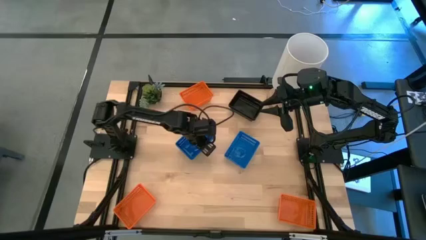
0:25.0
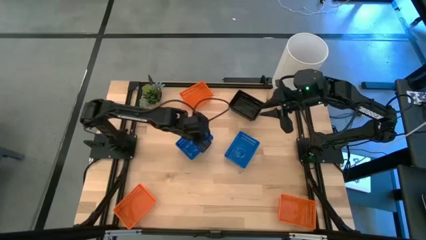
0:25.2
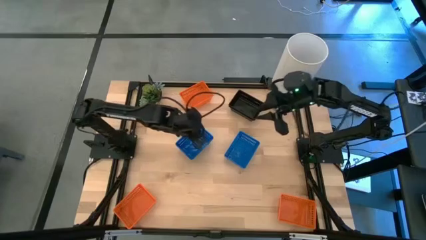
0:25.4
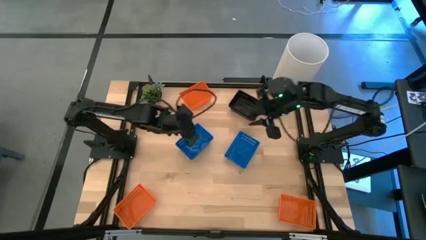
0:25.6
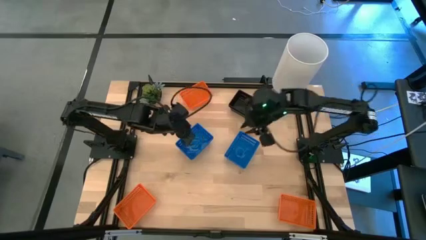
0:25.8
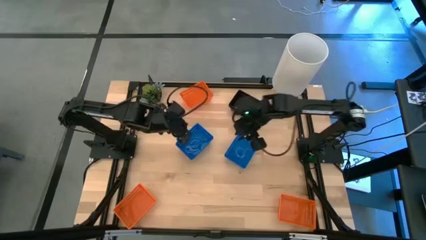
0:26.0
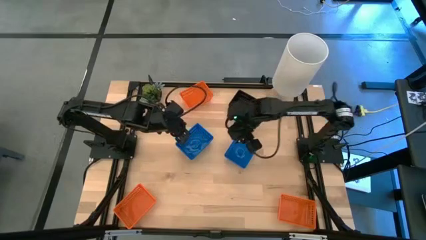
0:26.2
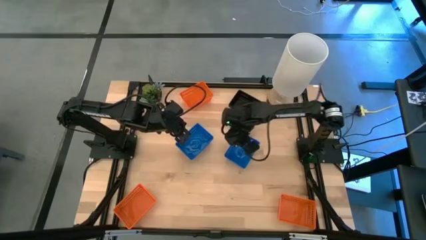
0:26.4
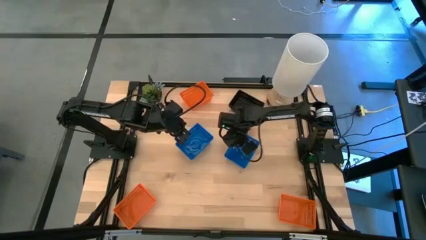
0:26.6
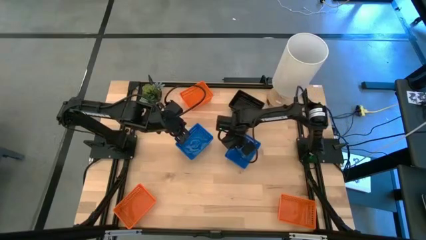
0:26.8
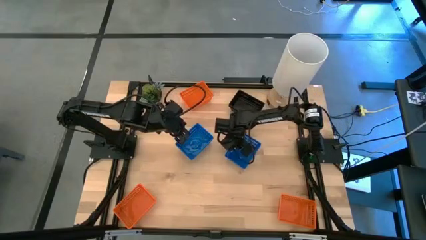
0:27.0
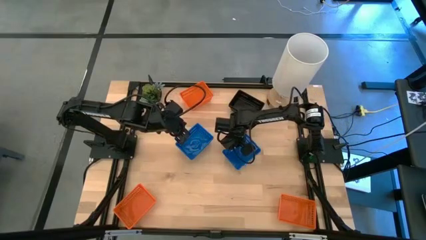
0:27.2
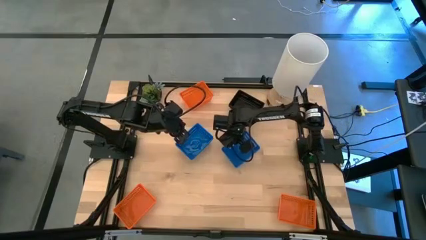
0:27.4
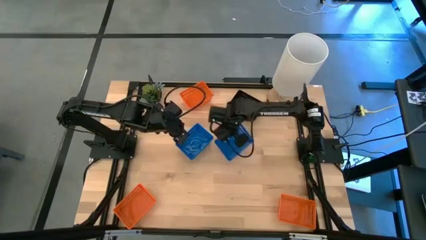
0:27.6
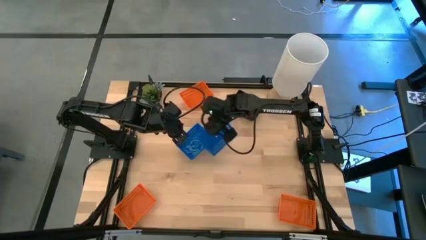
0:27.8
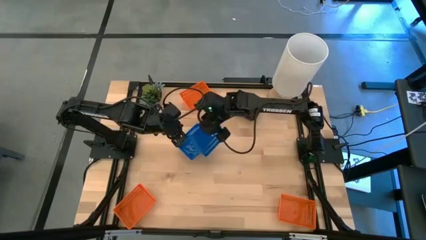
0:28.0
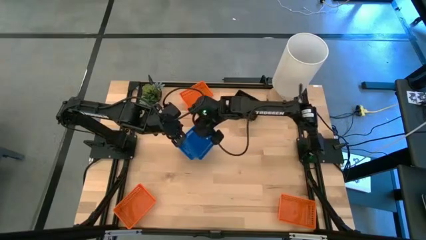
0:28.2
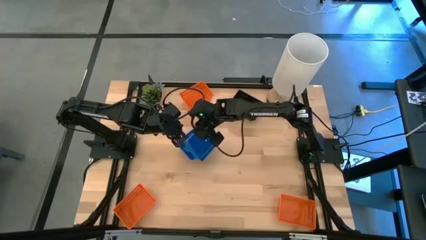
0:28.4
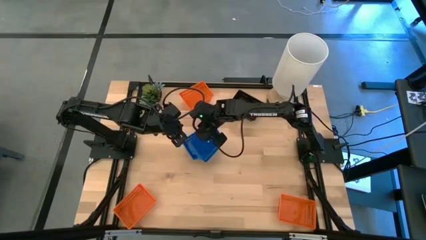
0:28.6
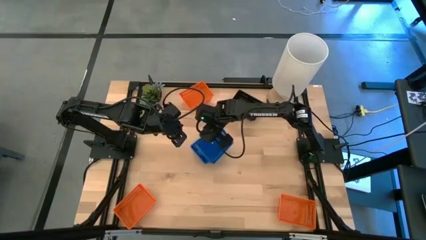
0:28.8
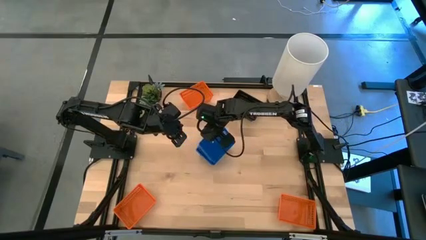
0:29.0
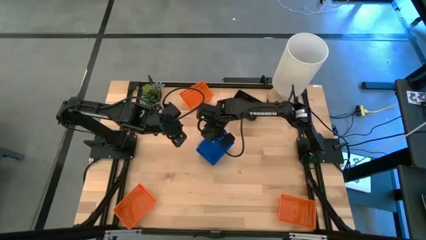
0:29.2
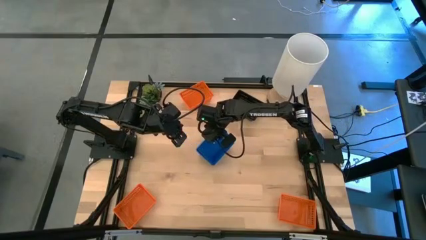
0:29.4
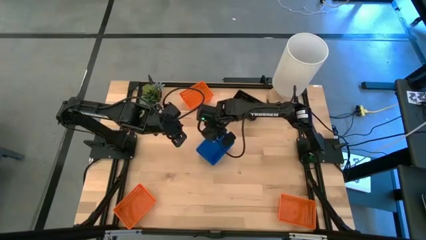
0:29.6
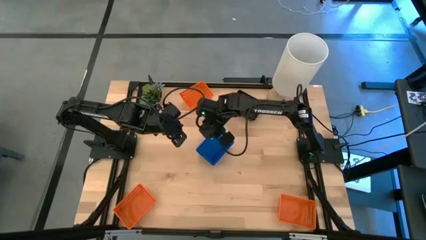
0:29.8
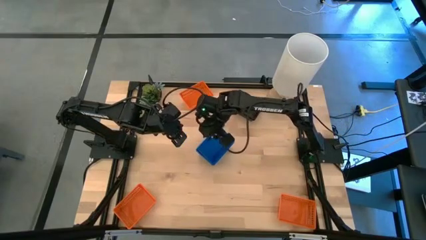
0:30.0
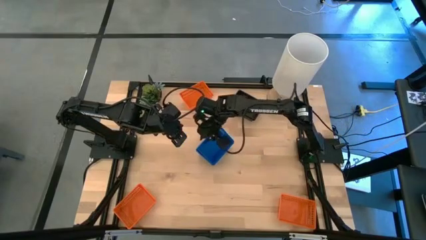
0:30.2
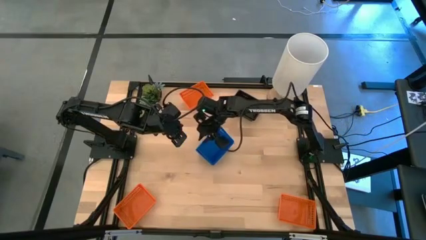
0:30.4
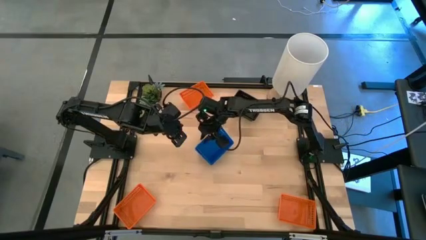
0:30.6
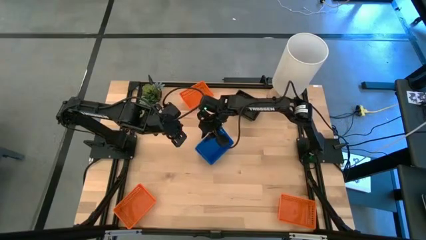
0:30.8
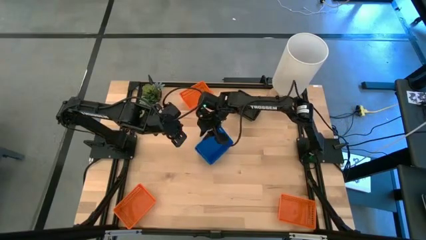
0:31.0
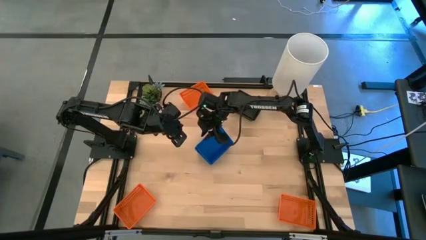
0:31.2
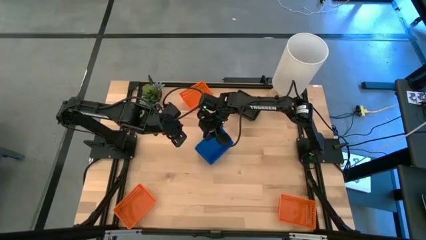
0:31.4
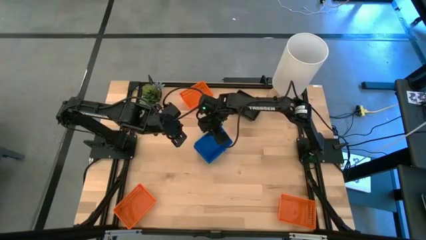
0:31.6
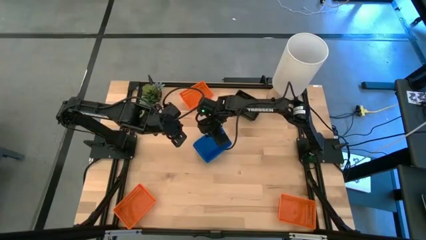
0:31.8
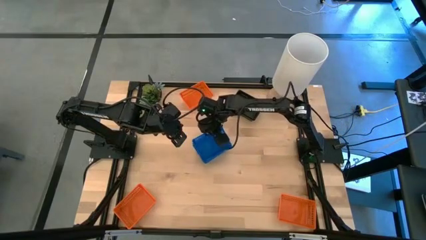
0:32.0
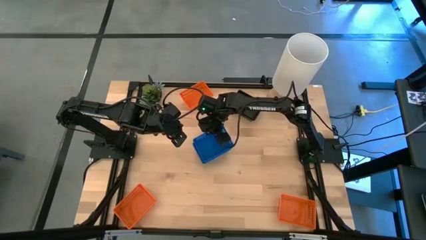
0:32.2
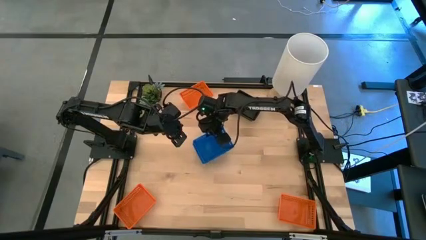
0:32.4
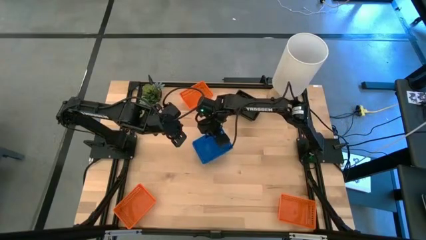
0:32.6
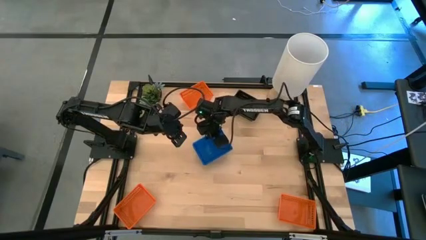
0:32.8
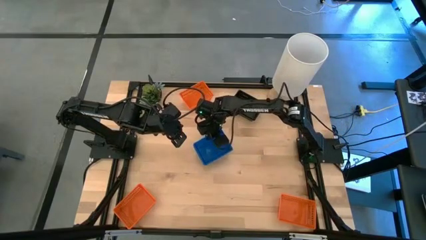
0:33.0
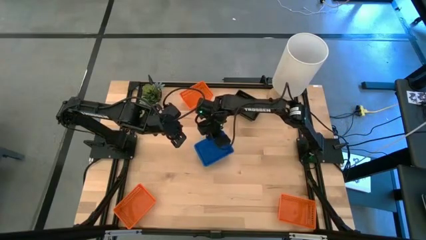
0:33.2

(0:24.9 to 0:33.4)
Stack the right blue bin on the left blue bin

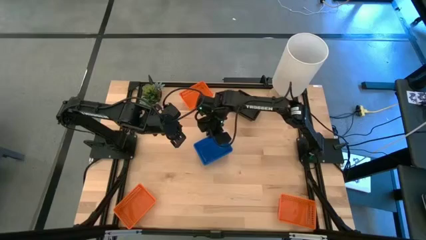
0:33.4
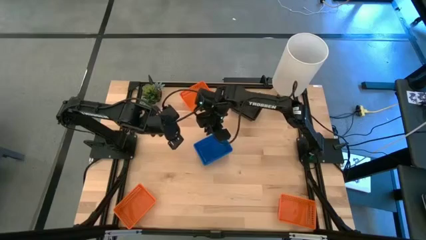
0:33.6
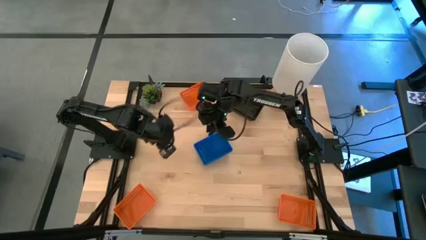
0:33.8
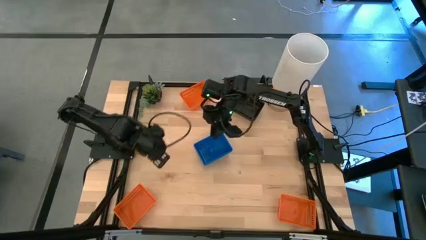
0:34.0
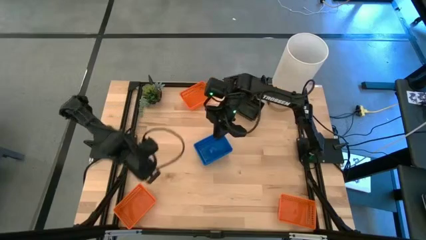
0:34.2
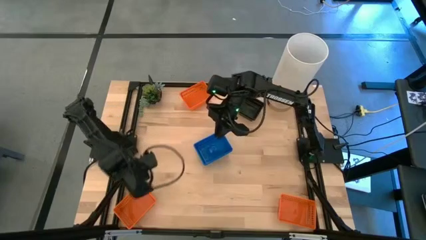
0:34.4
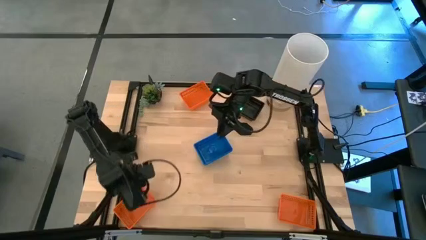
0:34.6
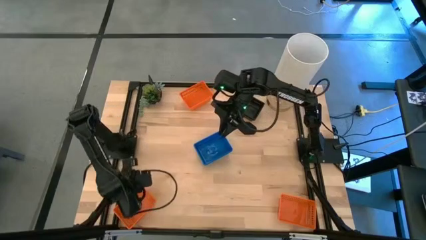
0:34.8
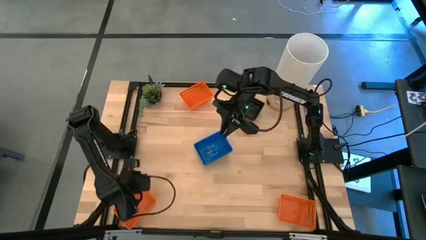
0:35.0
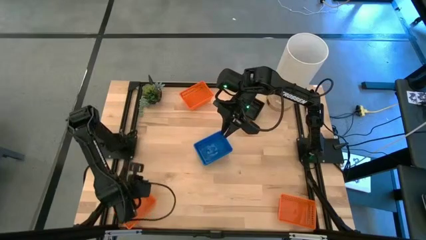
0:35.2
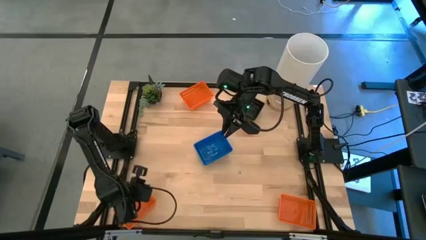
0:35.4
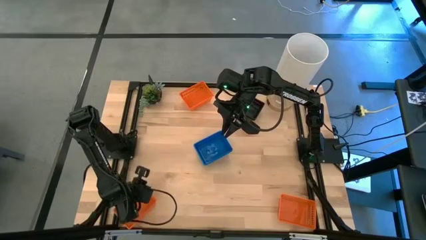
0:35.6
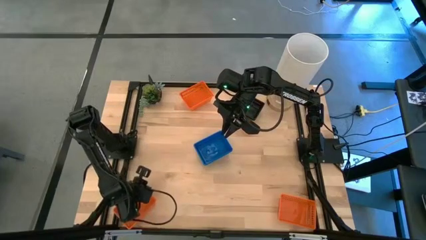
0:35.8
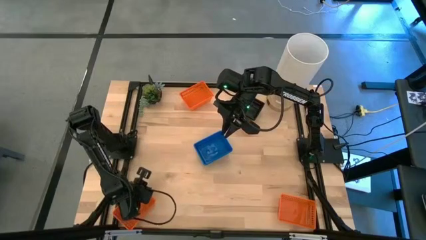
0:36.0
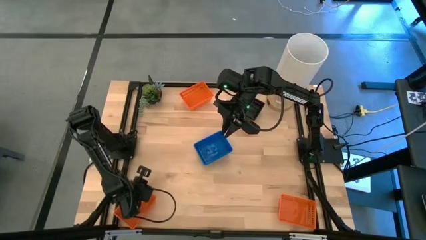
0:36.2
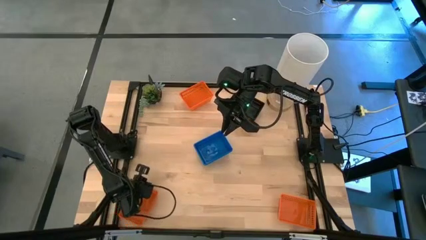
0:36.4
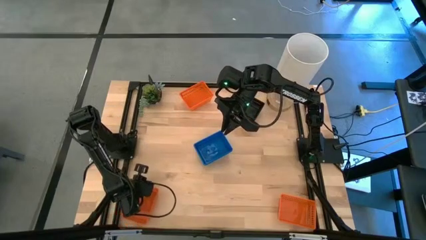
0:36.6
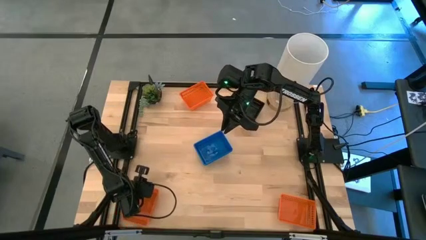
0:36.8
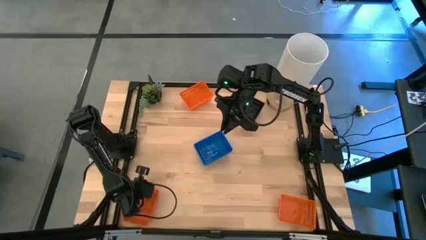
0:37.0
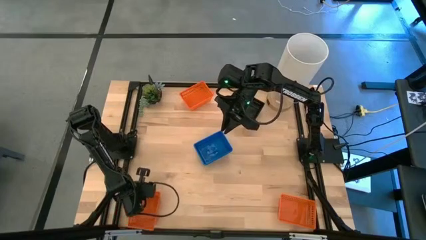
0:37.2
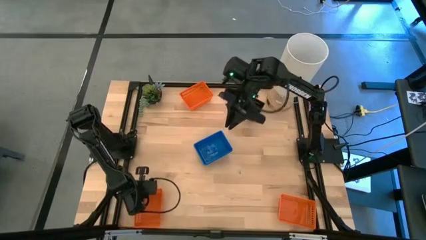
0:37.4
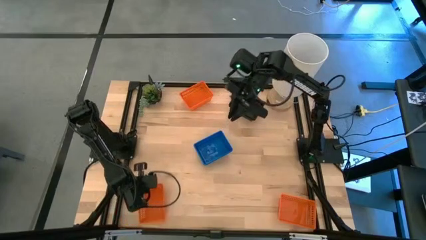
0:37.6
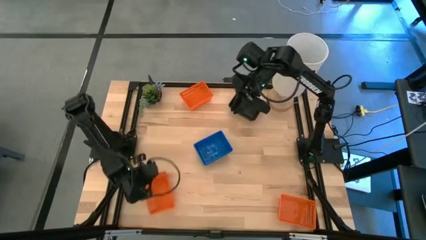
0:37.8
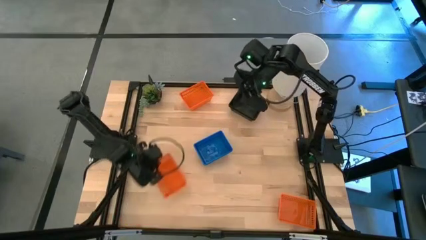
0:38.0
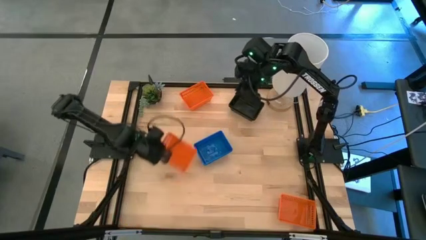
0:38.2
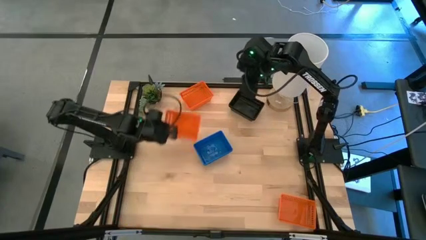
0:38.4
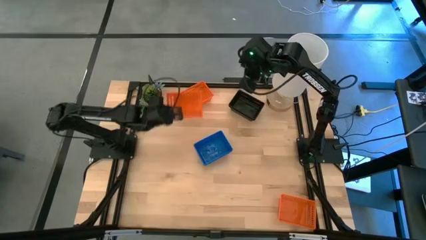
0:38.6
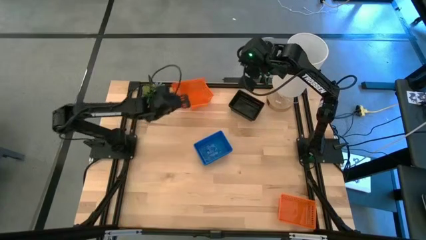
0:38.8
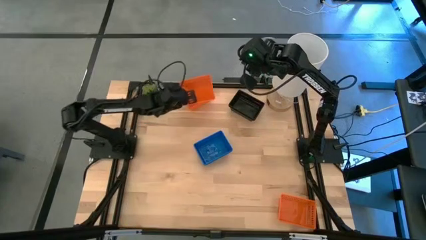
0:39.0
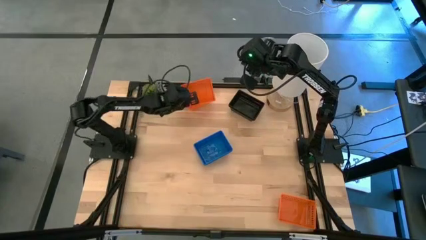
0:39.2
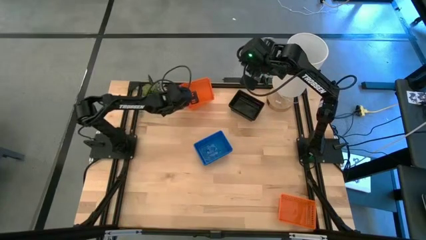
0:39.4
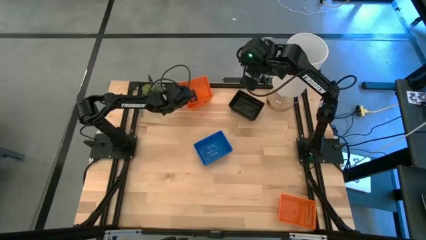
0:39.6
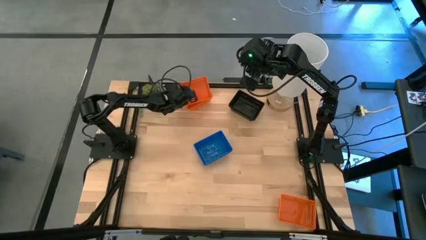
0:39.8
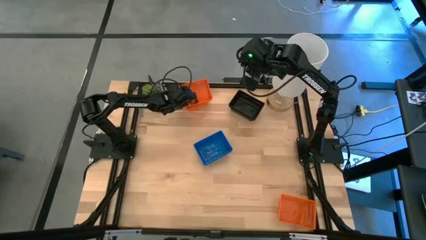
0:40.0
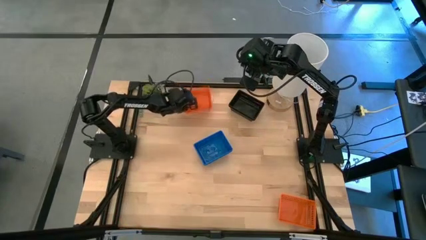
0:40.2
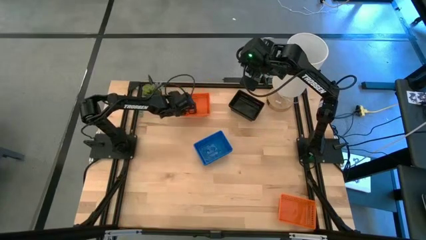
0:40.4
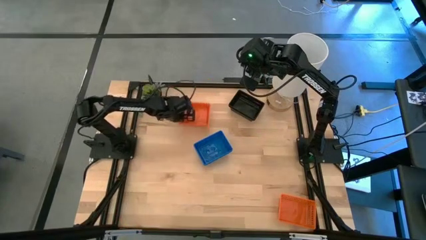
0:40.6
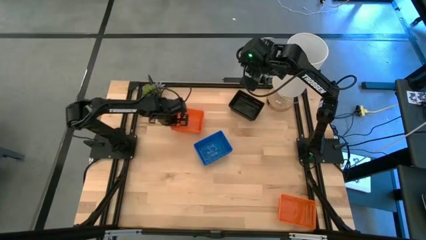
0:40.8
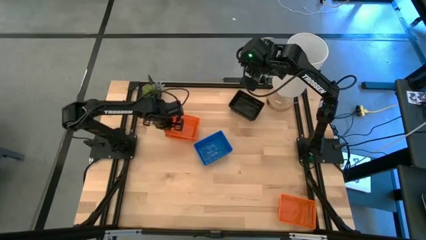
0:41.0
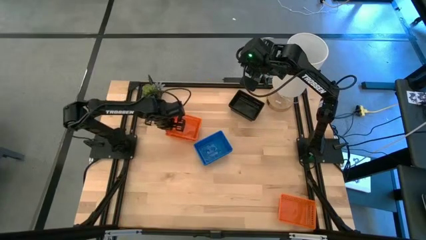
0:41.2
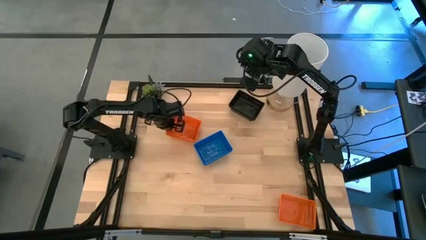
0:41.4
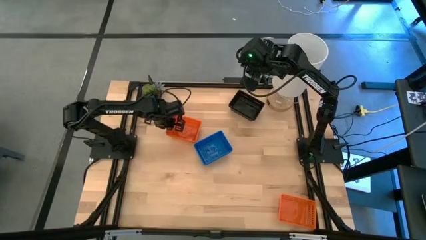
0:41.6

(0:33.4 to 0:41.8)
Stack the bottom left orange bin on the top orange bin
